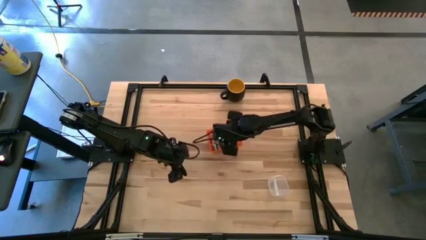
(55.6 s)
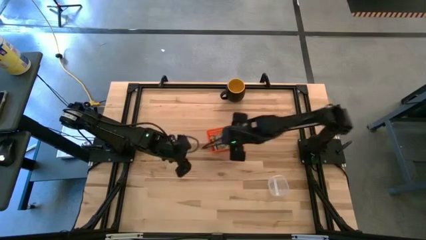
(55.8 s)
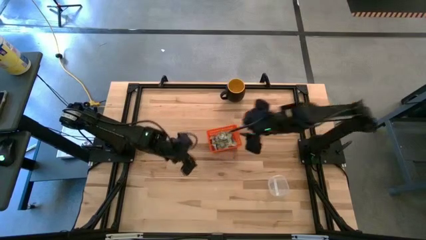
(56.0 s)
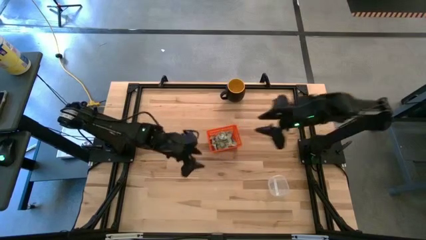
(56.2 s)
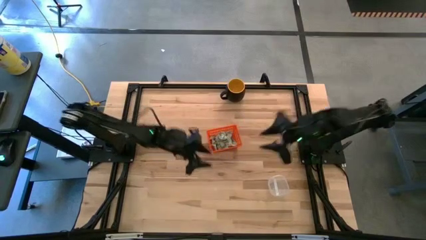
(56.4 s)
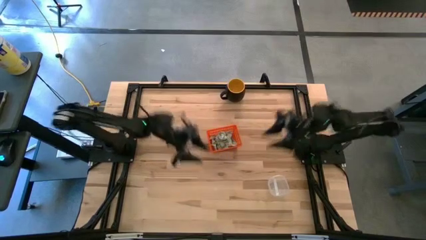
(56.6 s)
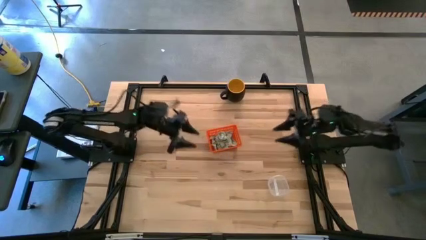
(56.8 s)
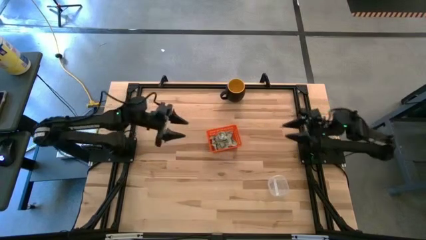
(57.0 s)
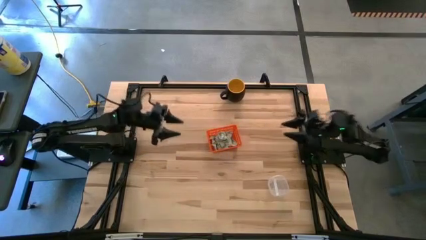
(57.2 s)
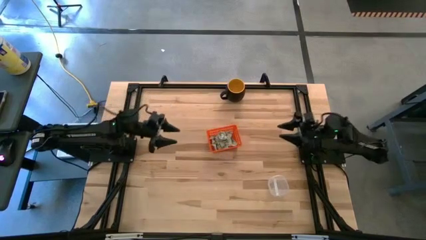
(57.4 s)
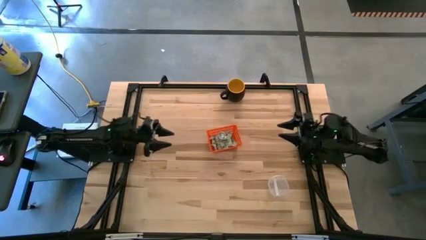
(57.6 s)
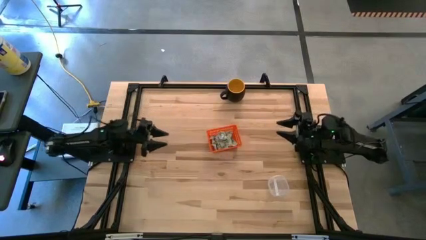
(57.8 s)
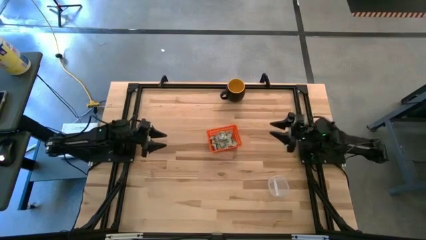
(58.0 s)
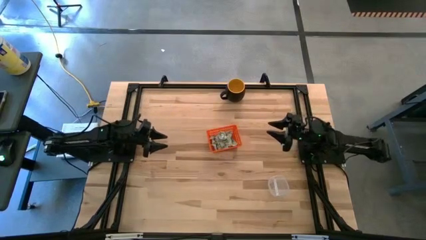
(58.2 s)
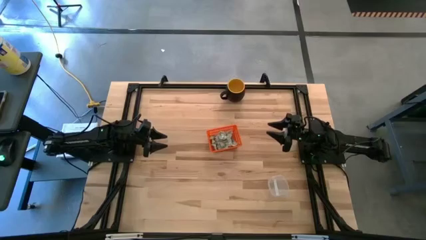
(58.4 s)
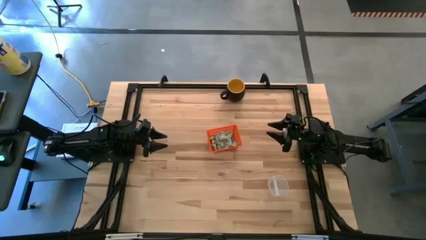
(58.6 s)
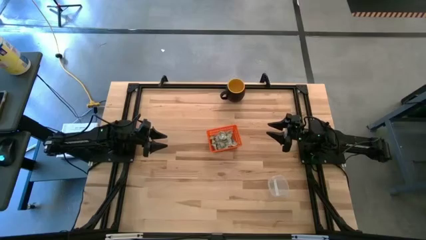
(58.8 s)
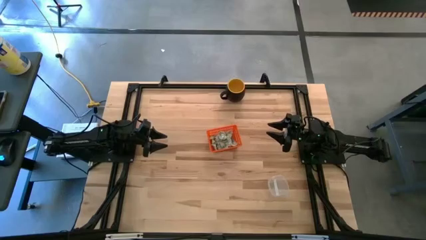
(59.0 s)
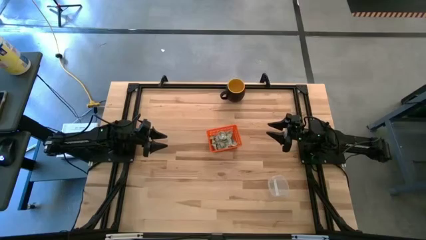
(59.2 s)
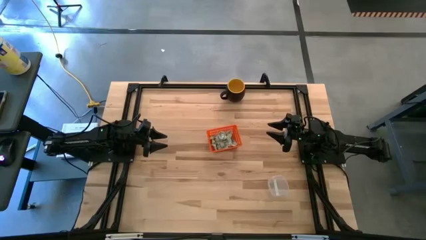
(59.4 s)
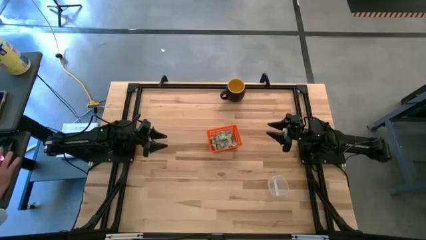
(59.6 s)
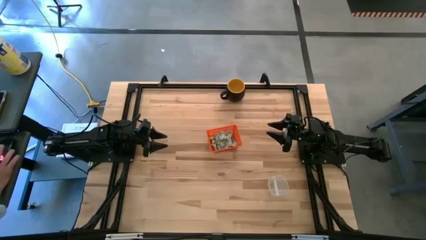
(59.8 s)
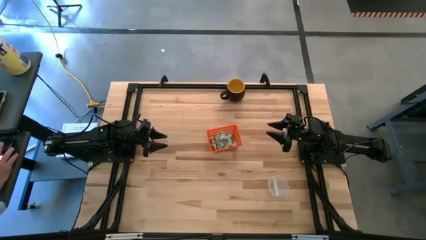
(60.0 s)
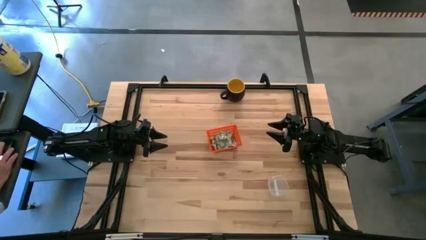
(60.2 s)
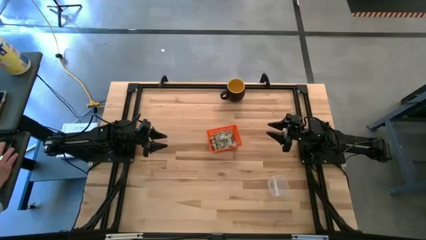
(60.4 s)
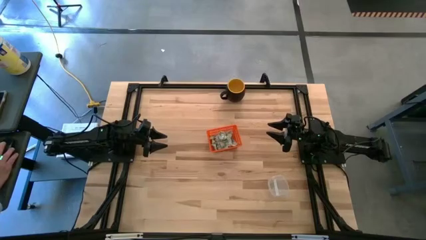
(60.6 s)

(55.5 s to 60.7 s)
Task: Pick and place items into bin
Return to Home Position

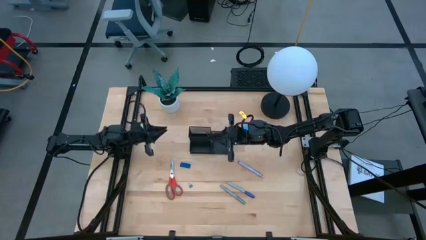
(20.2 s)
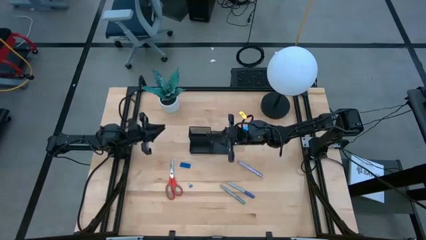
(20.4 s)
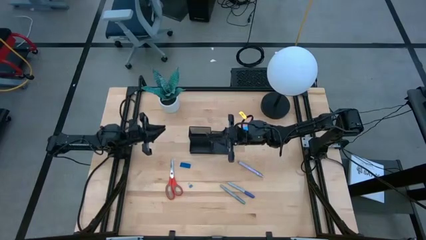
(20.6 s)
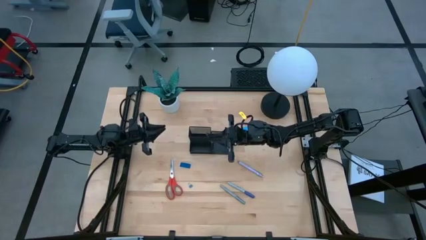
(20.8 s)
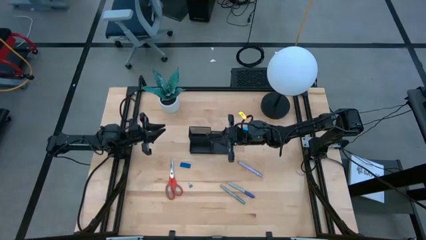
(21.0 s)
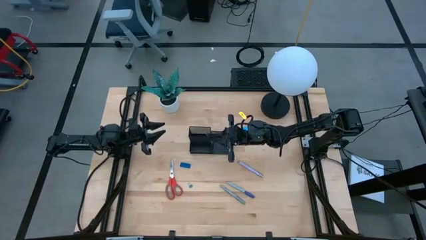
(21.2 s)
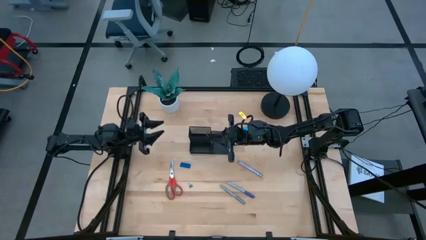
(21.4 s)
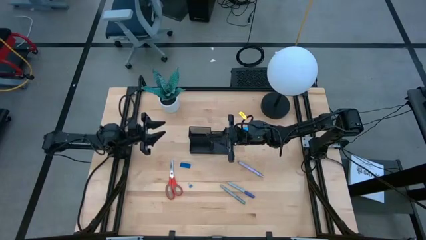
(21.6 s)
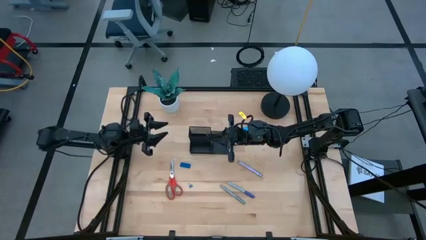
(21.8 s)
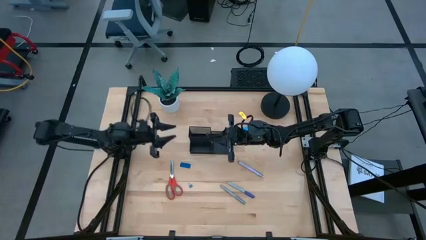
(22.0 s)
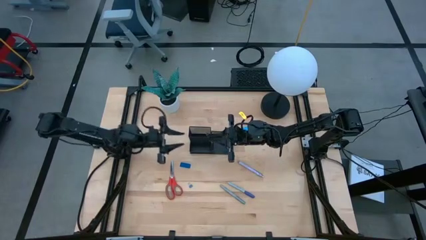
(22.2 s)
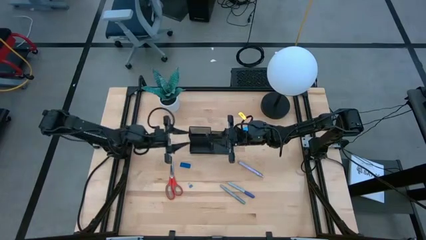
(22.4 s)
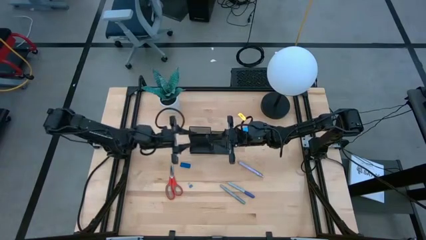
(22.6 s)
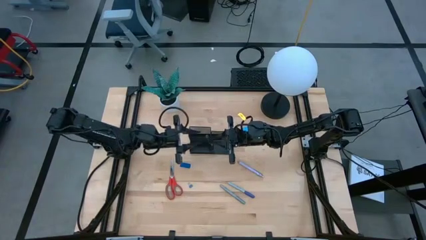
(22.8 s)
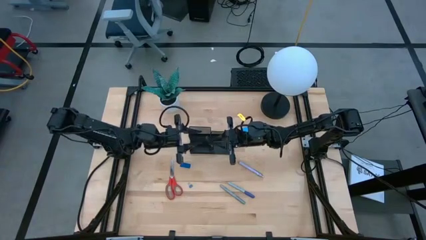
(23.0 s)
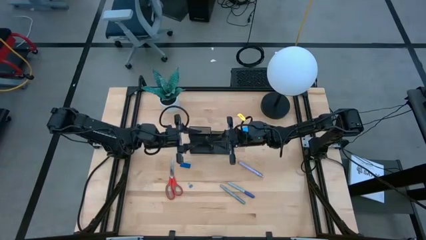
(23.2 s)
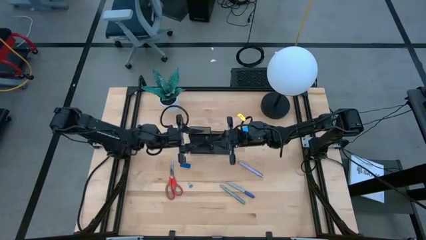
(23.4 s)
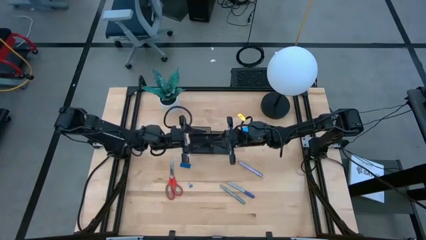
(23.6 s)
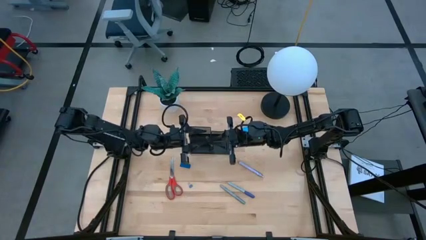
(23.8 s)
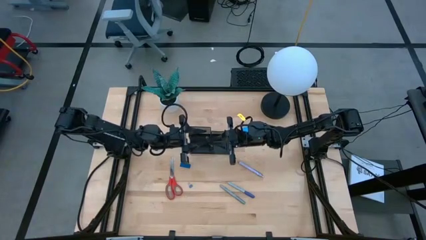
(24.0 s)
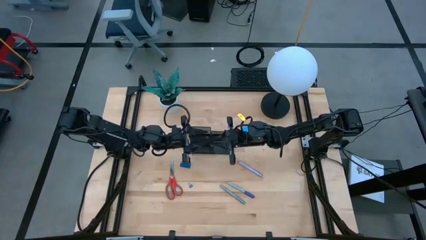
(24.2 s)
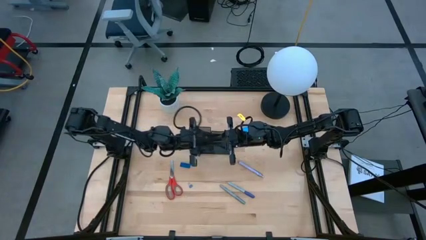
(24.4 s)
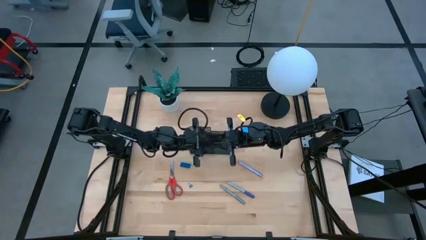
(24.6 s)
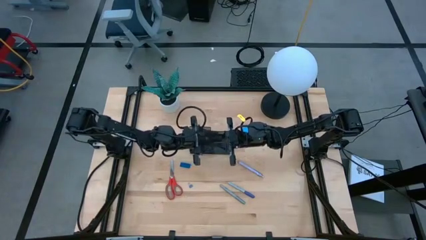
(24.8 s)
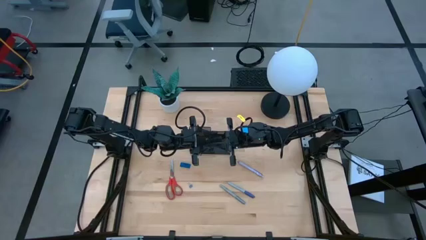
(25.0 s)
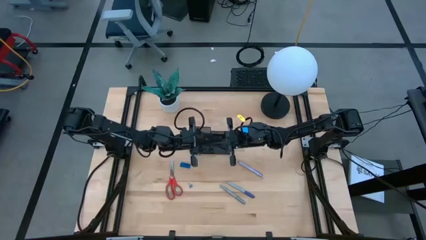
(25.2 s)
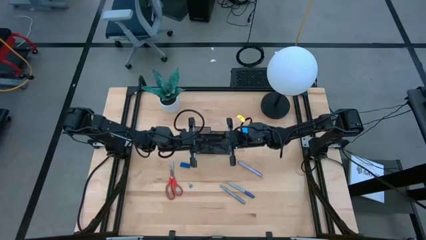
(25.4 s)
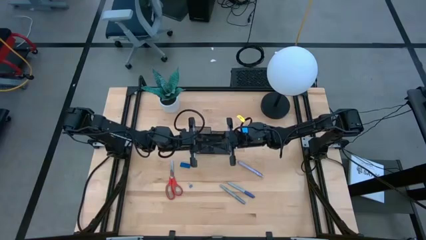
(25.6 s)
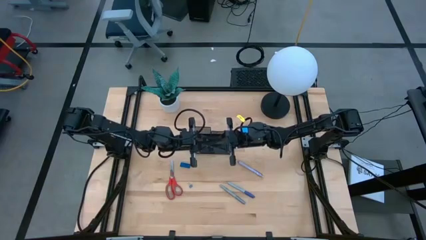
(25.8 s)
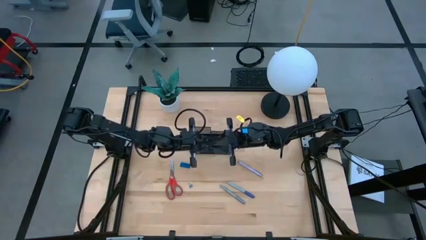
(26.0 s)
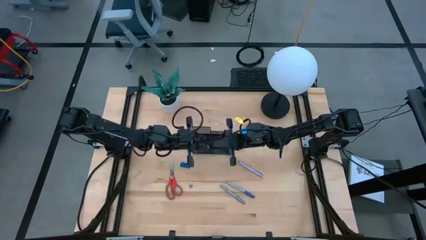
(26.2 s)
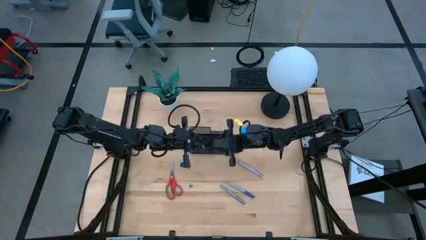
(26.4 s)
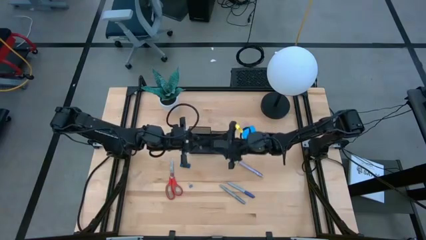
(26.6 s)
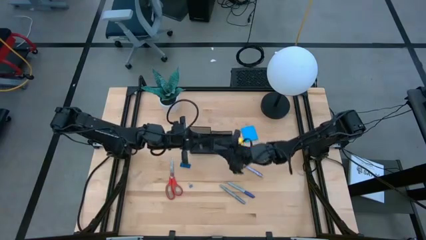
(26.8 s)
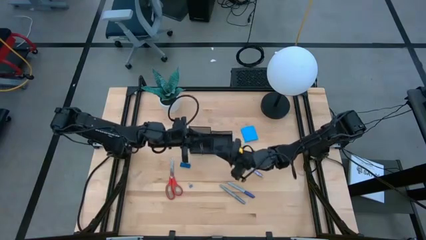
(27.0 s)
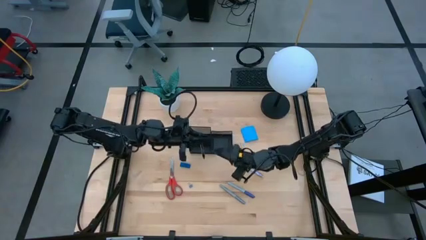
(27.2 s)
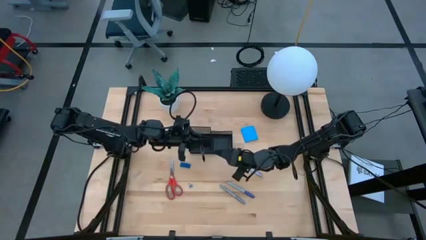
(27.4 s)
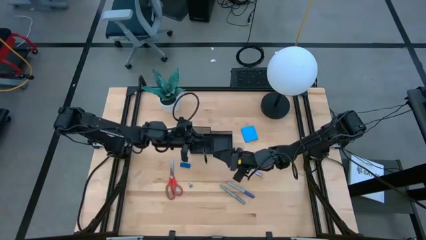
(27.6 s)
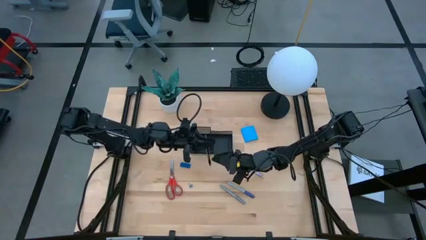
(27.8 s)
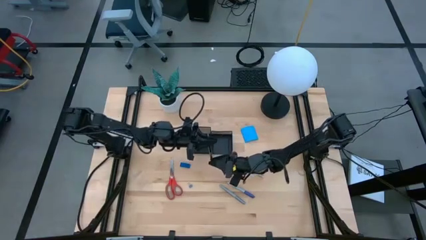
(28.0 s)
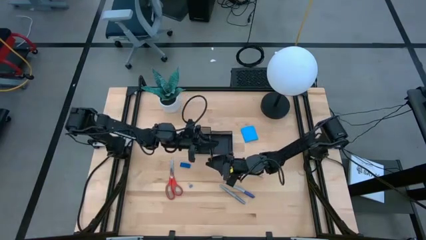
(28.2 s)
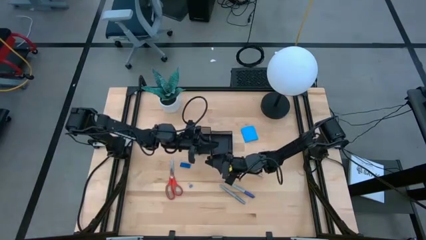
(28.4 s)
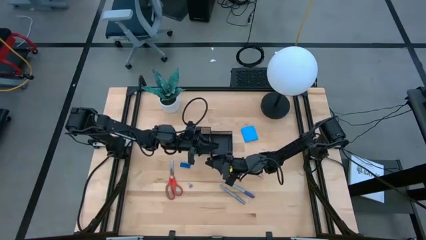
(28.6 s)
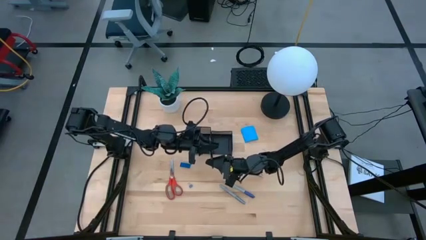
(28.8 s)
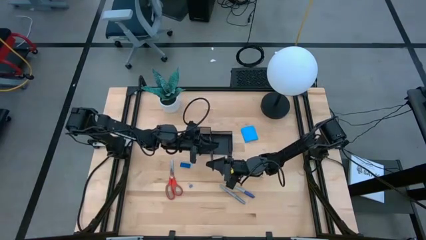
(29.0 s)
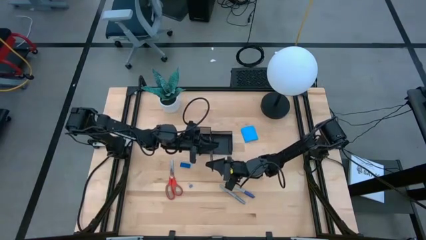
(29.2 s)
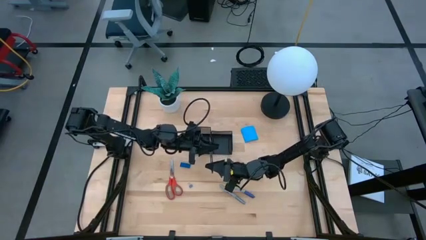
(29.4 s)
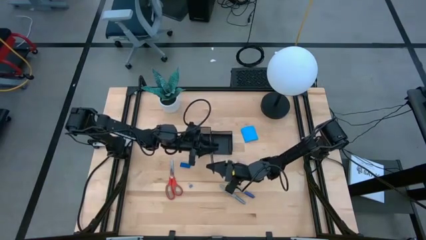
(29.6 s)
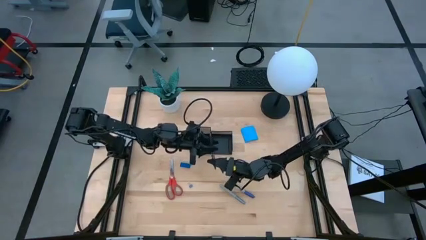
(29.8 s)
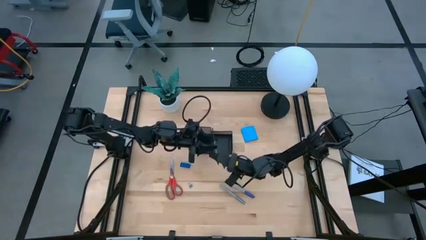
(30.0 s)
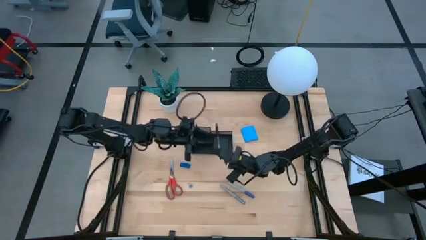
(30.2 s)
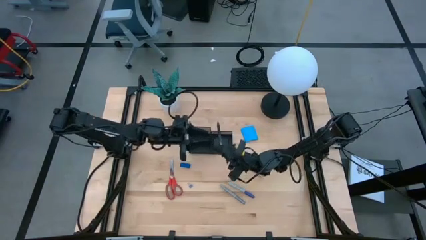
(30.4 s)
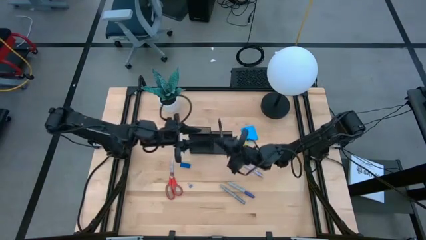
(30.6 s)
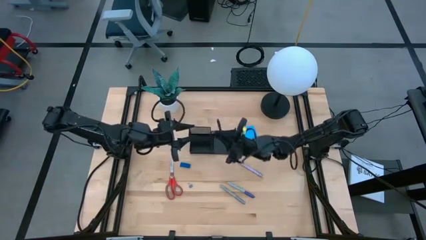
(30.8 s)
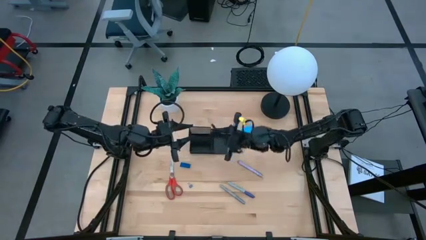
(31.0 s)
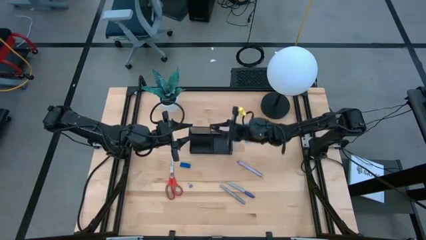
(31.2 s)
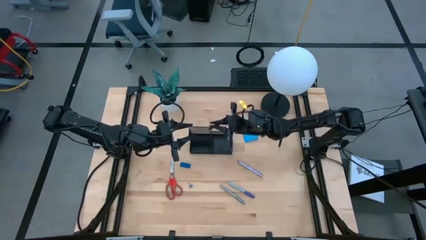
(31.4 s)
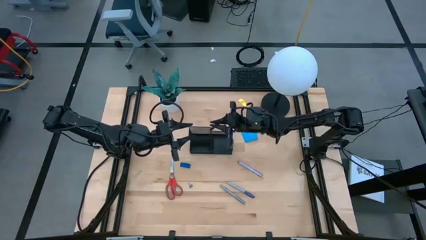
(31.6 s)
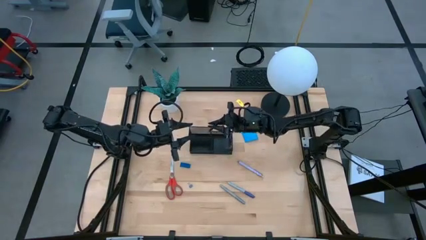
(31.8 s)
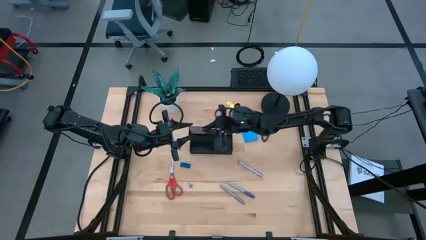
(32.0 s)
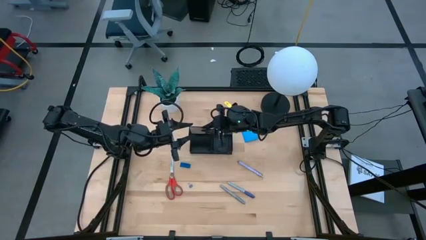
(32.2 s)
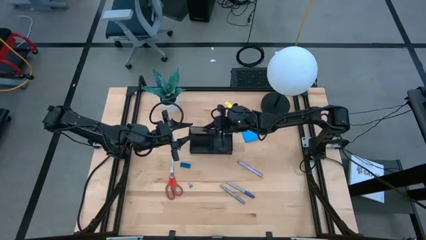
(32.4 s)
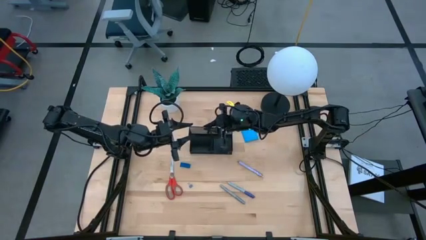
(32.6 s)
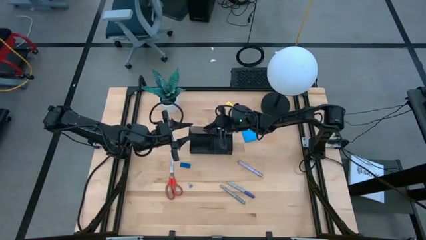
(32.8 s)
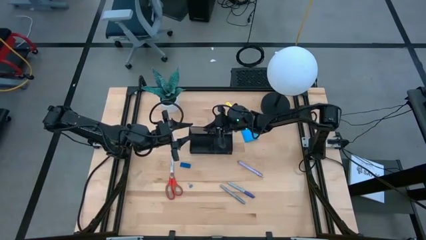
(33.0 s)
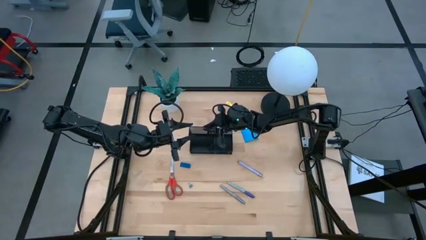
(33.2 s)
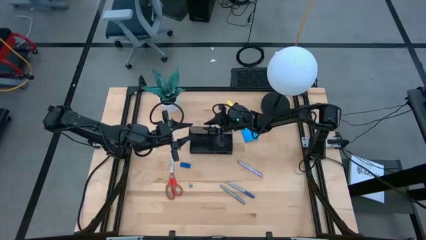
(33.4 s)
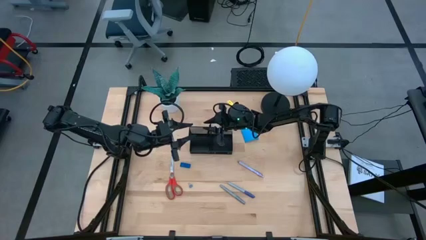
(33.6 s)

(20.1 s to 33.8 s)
Task: Pick and place office supplies into organizer
Put the black pen into the black desk organizer
